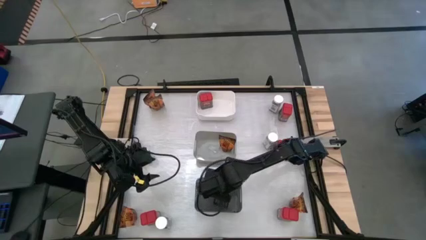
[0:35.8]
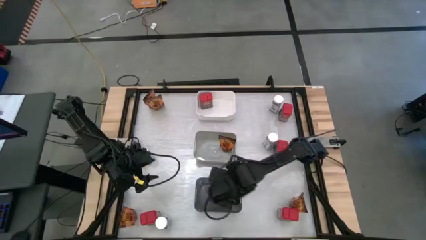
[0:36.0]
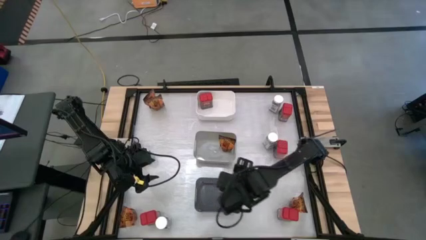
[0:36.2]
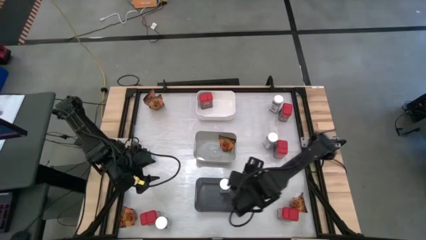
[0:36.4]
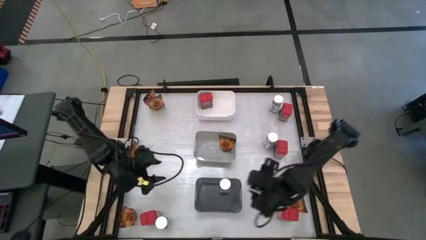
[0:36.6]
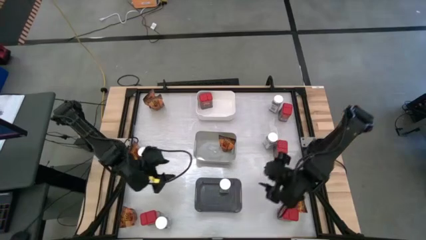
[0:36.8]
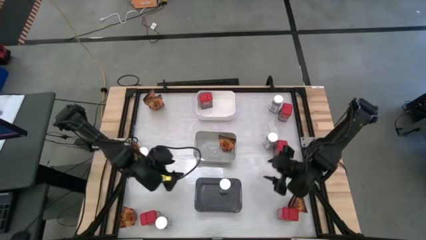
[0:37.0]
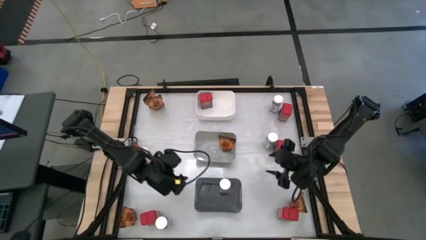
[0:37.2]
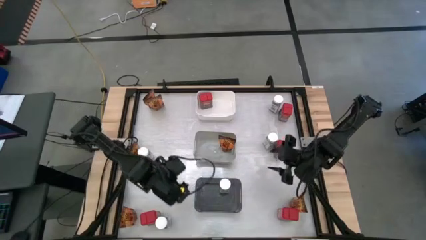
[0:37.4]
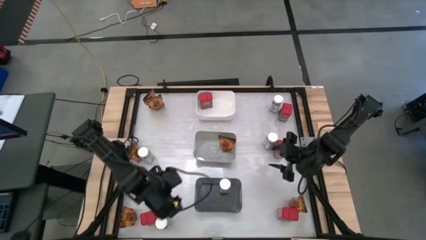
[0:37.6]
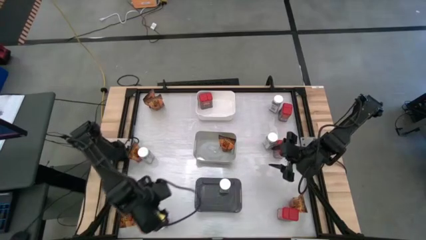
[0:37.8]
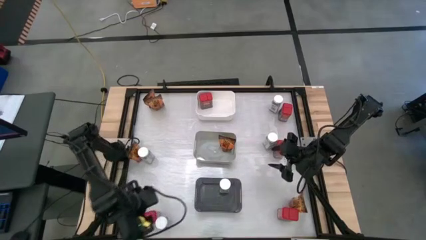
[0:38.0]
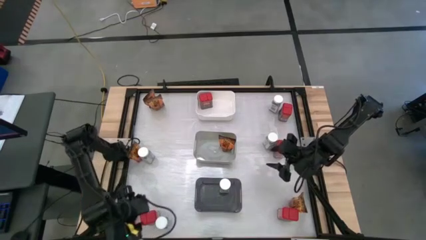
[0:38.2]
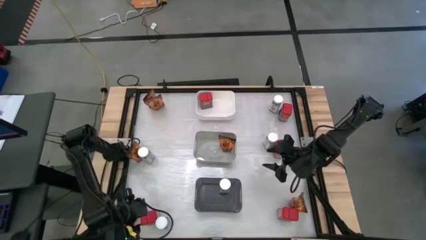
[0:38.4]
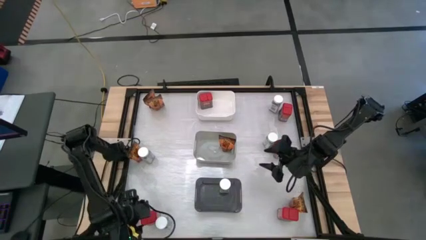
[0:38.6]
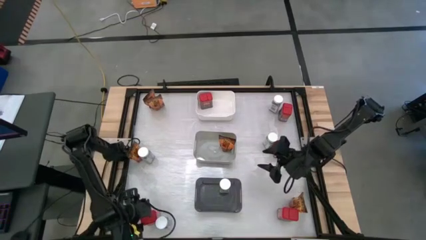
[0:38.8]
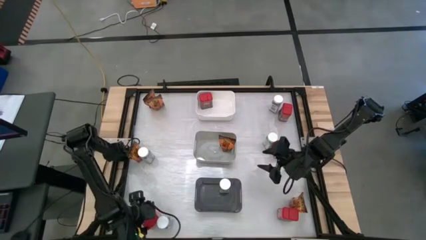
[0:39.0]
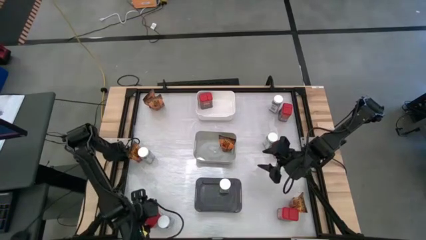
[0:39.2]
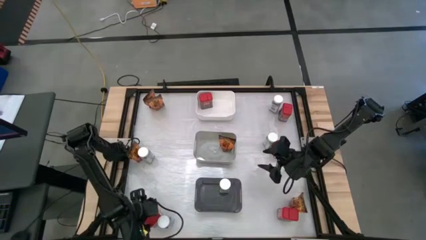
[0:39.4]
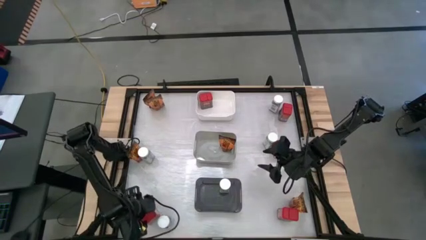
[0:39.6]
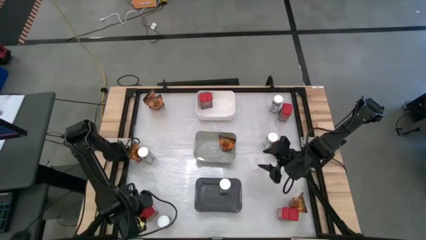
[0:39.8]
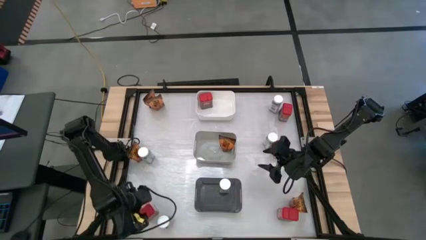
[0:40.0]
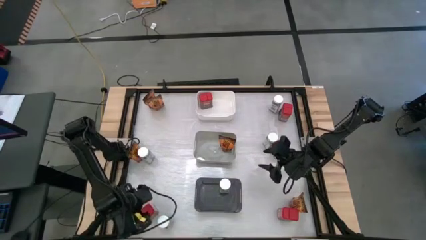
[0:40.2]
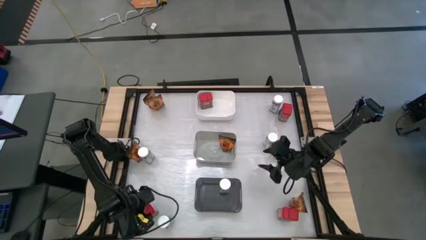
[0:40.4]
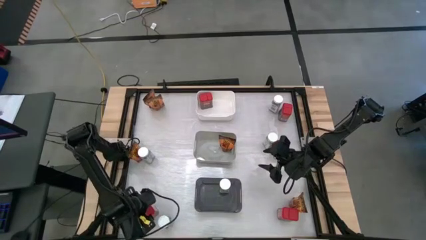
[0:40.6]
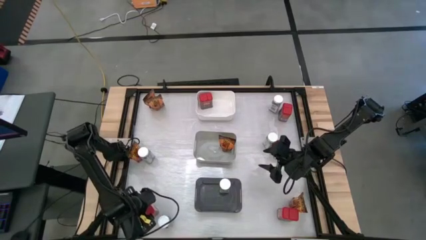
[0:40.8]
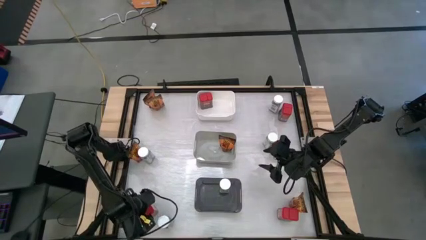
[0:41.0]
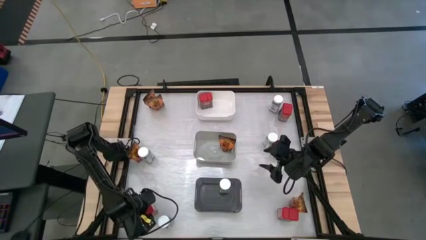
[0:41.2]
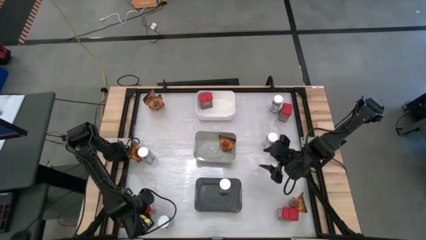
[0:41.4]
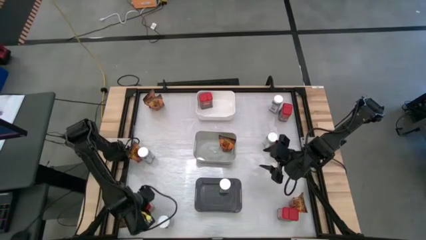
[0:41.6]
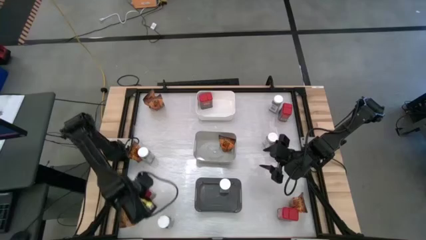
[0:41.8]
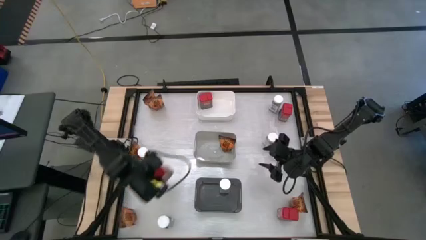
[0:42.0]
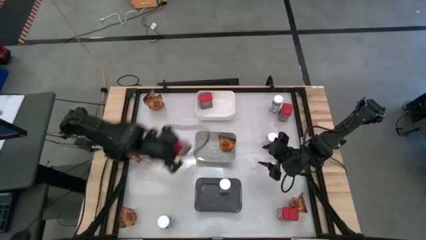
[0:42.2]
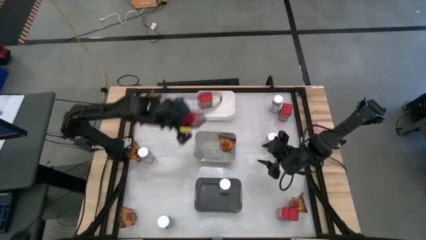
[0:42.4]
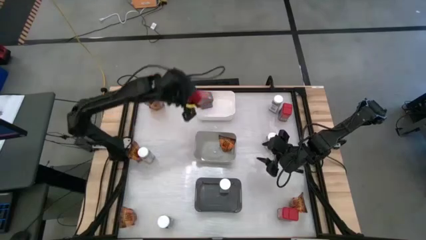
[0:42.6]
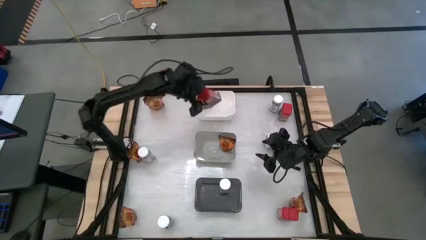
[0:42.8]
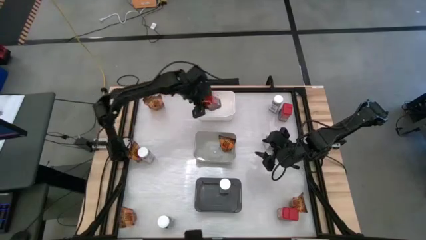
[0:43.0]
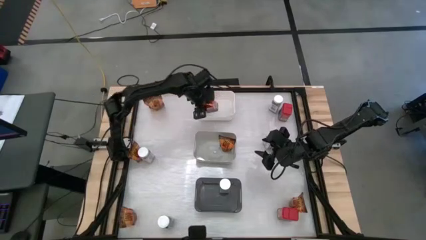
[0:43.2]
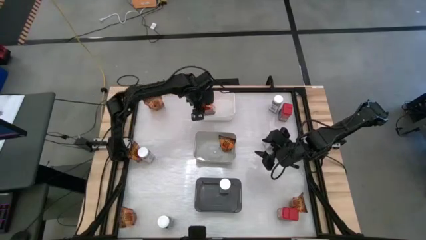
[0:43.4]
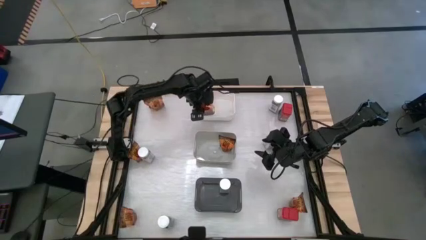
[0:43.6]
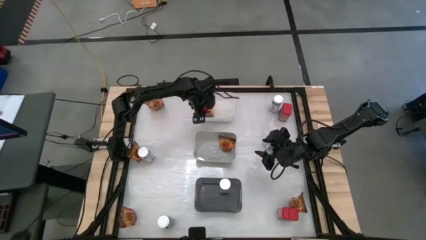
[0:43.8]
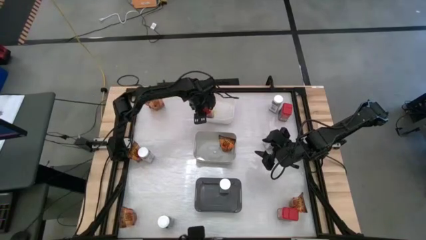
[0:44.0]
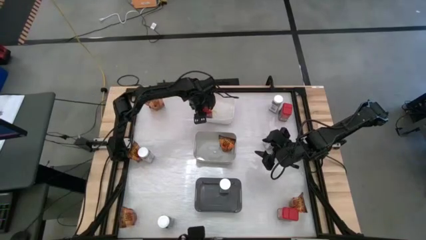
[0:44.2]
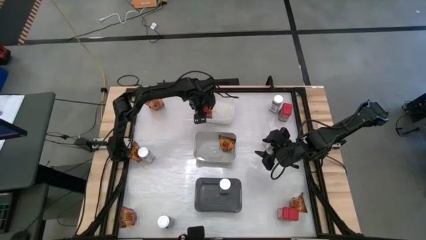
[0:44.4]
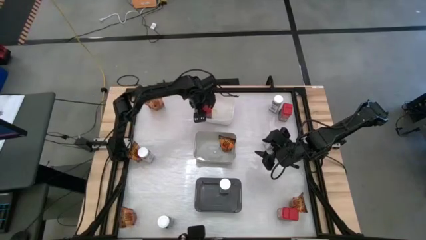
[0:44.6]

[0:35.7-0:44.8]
Task: Sort spices by type
Put the red seasoning can into the white bin

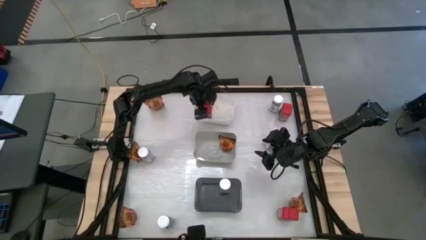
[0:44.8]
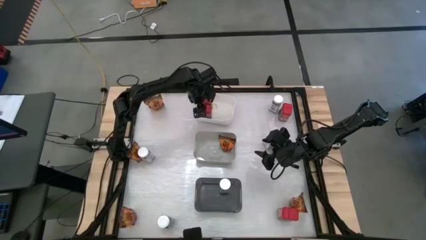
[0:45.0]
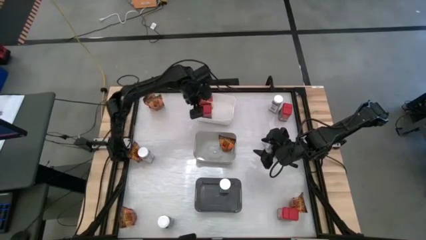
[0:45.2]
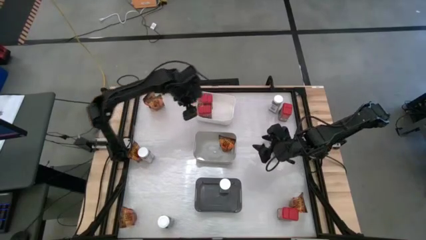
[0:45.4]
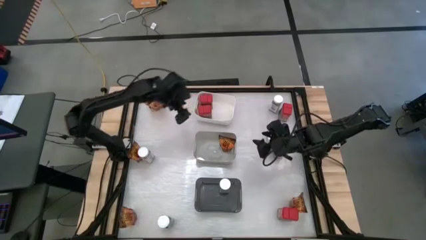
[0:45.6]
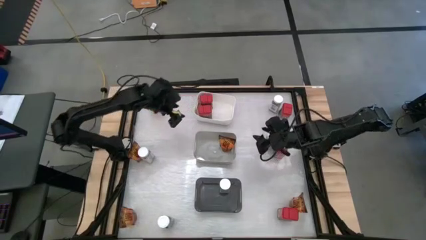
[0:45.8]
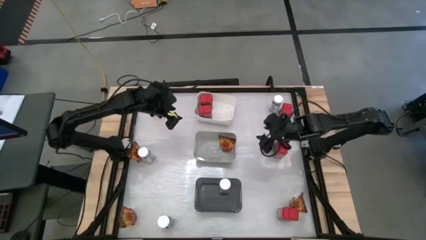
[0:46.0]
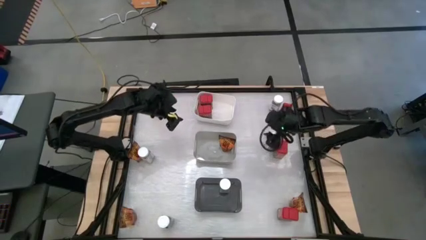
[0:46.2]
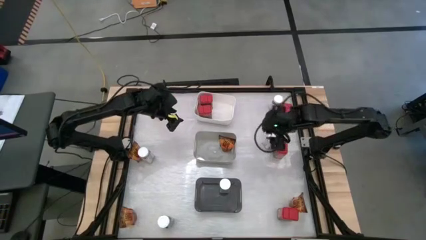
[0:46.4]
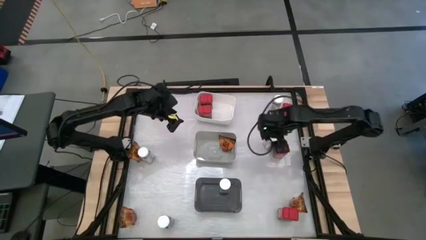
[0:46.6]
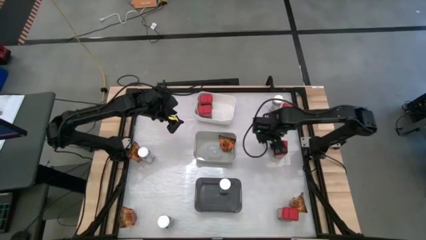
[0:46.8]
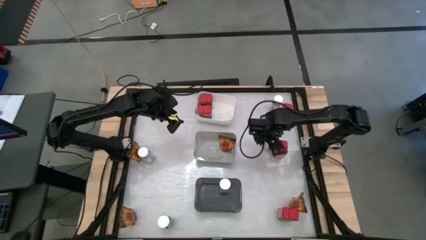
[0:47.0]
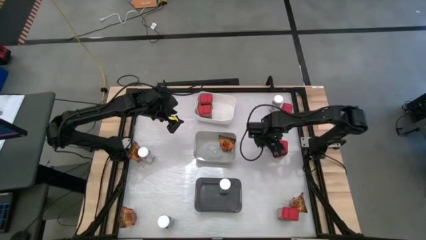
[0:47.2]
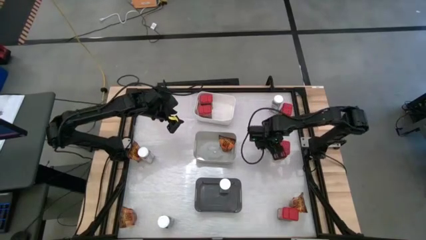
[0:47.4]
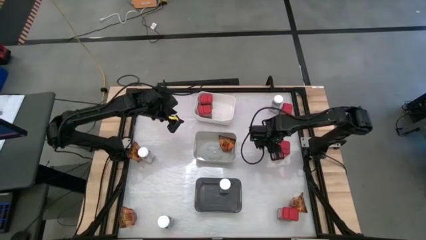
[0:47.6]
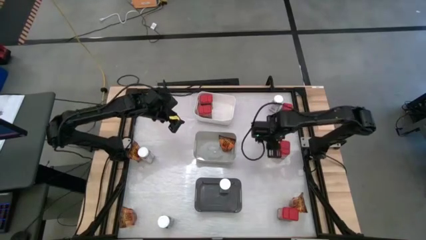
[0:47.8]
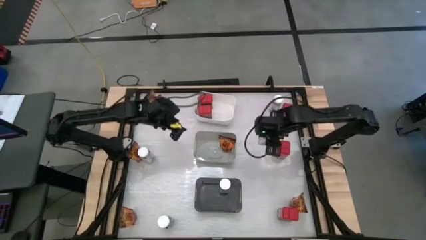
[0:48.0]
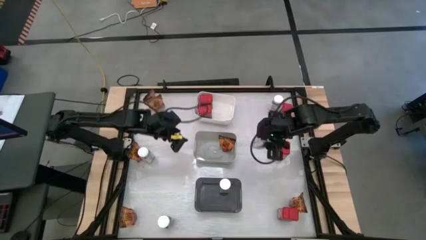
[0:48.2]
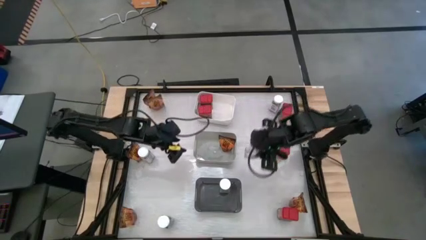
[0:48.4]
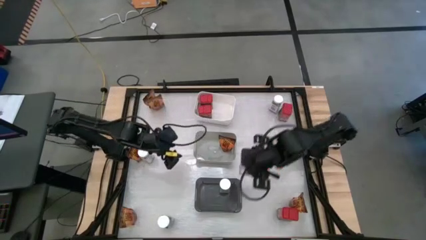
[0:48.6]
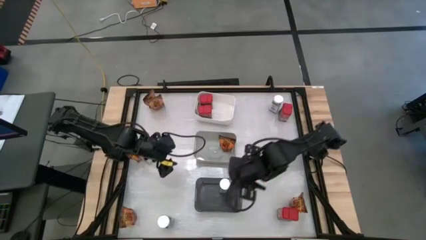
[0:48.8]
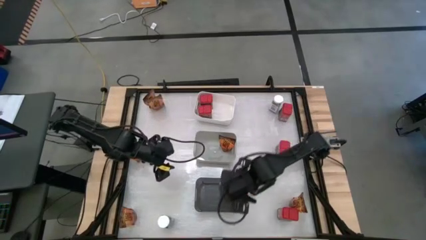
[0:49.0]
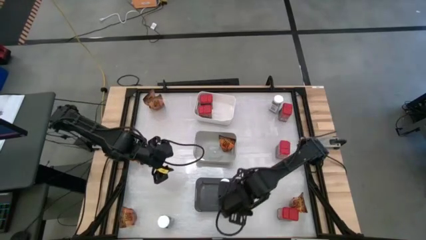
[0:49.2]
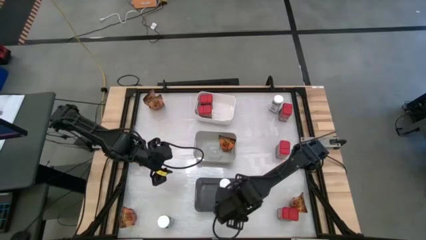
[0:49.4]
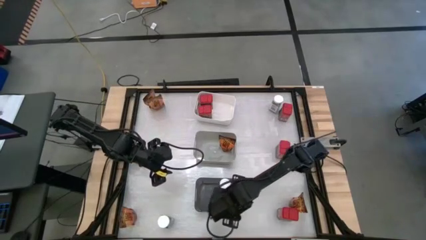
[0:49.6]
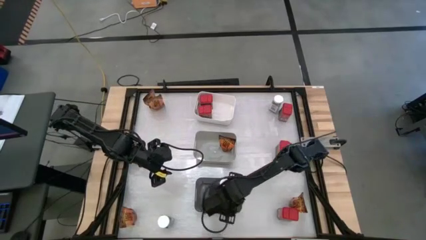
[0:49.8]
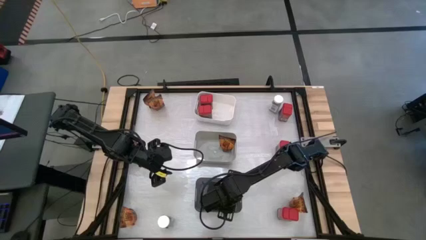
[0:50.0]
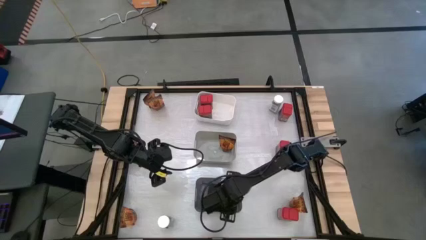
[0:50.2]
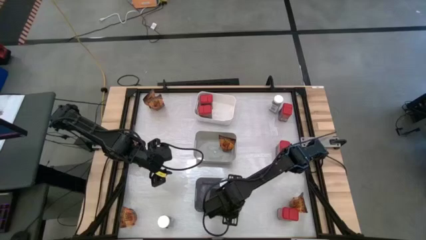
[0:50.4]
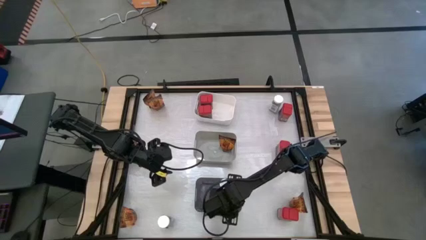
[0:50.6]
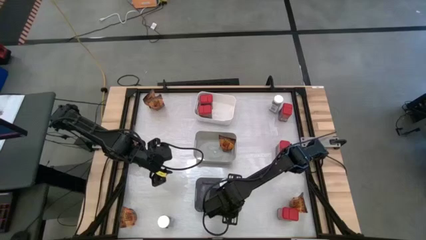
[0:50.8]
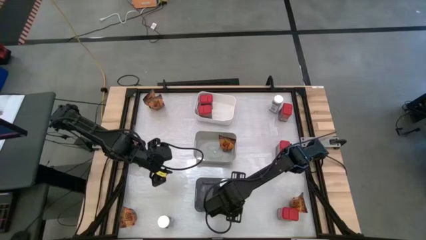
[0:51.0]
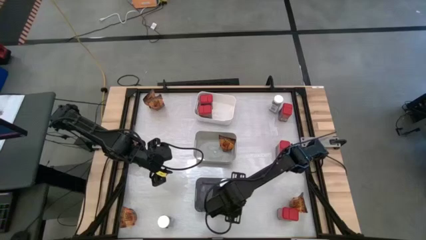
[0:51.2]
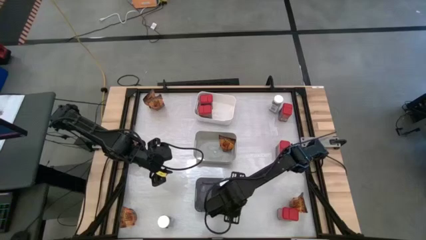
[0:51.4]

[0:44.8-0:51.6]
Put the white seasoning bottle into the black bin
